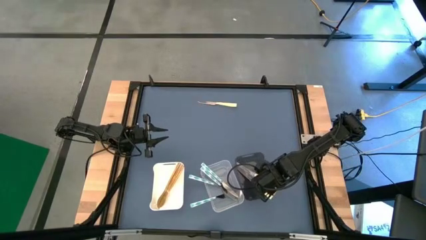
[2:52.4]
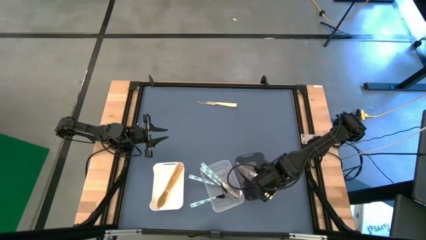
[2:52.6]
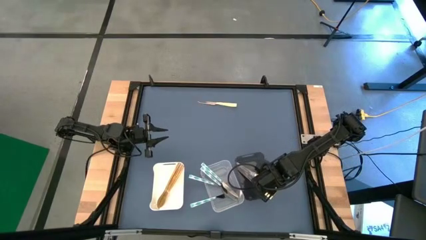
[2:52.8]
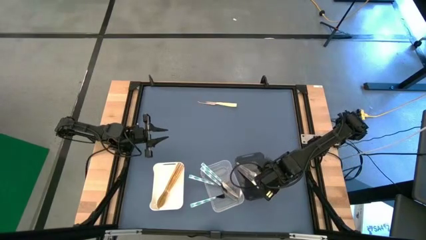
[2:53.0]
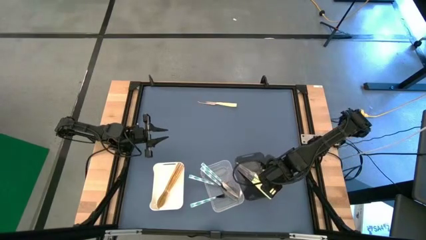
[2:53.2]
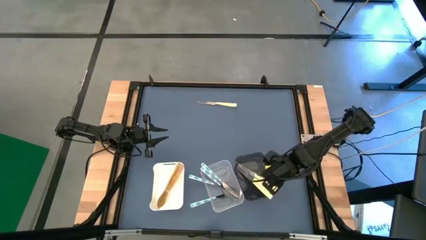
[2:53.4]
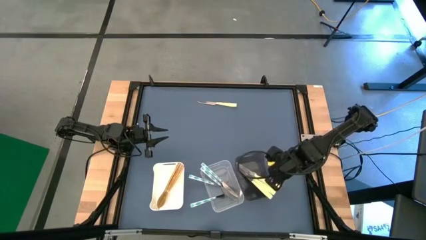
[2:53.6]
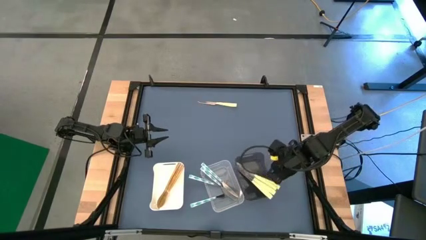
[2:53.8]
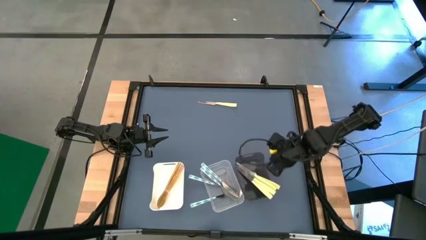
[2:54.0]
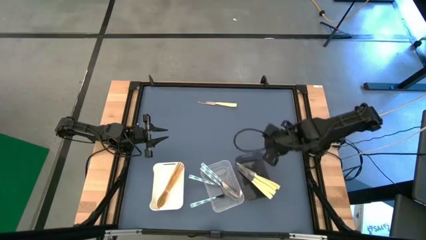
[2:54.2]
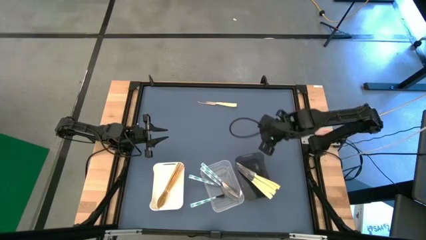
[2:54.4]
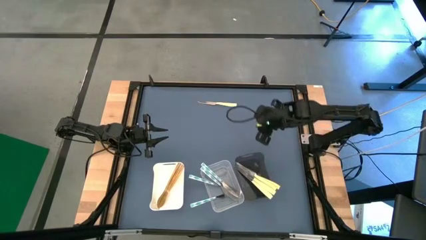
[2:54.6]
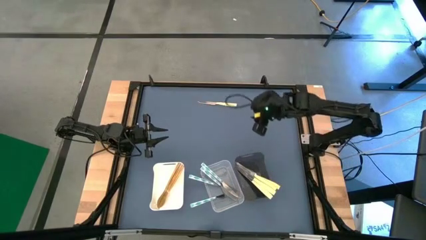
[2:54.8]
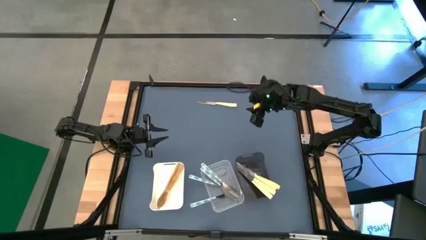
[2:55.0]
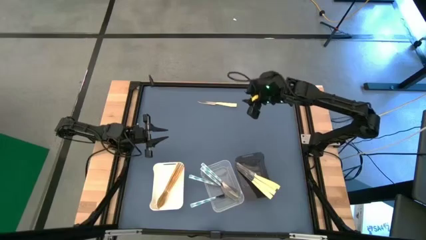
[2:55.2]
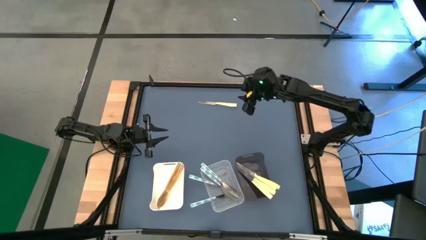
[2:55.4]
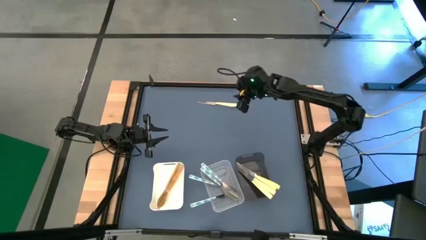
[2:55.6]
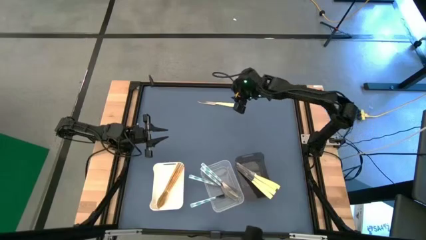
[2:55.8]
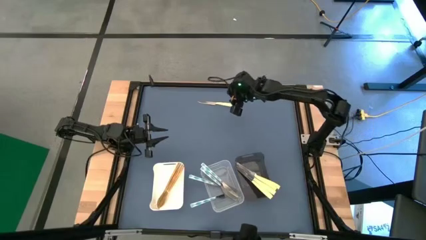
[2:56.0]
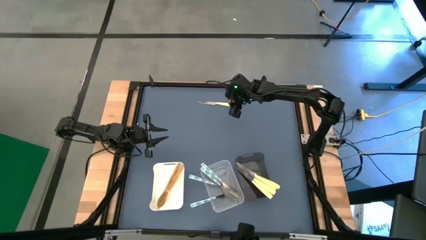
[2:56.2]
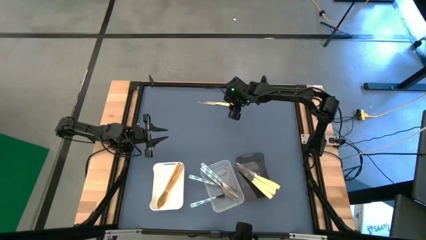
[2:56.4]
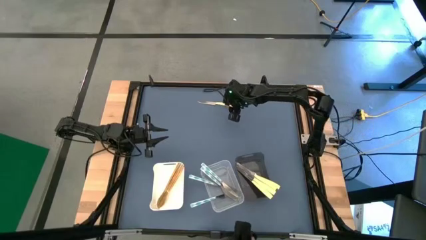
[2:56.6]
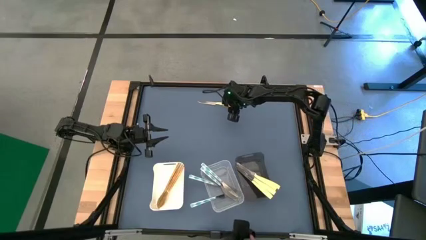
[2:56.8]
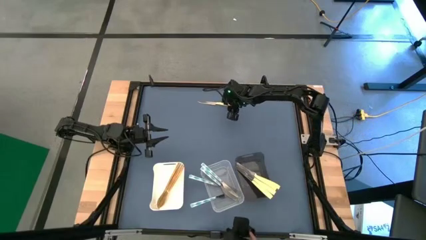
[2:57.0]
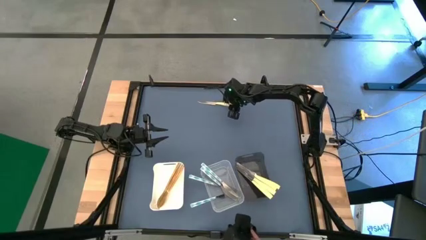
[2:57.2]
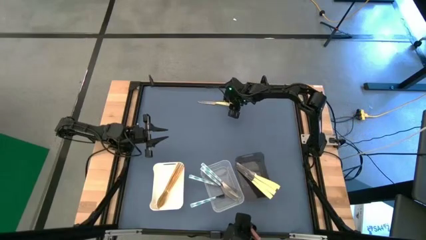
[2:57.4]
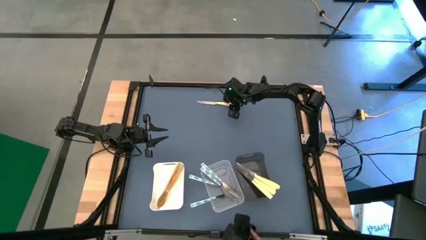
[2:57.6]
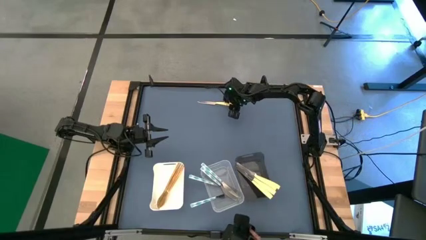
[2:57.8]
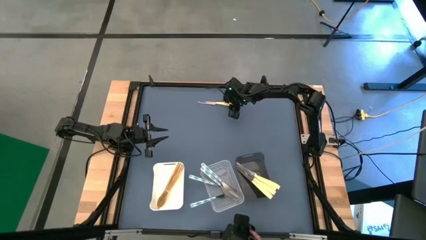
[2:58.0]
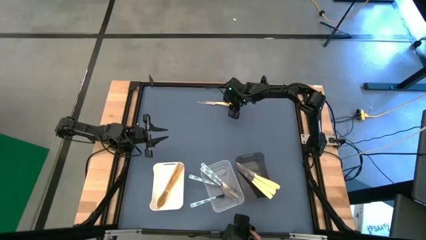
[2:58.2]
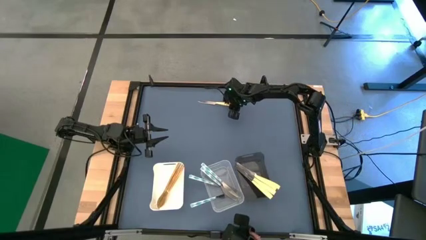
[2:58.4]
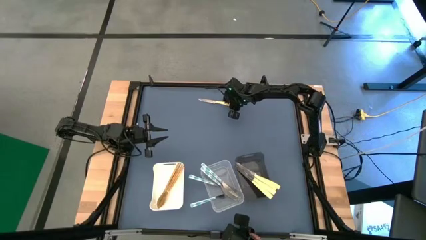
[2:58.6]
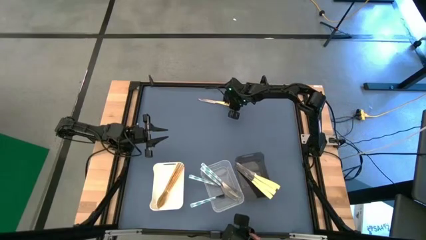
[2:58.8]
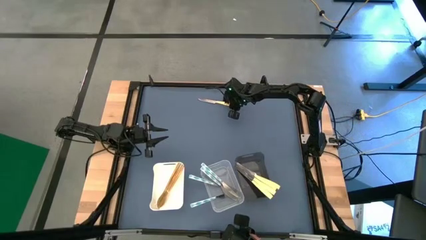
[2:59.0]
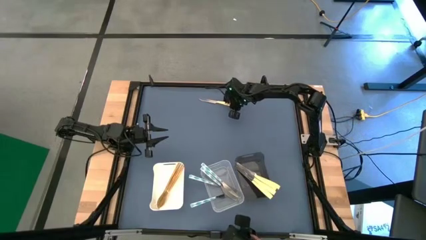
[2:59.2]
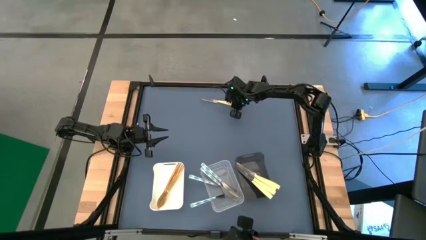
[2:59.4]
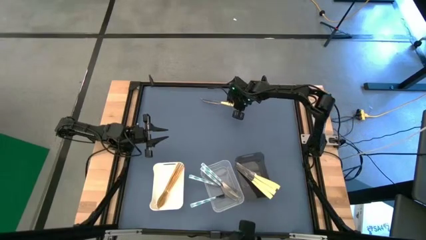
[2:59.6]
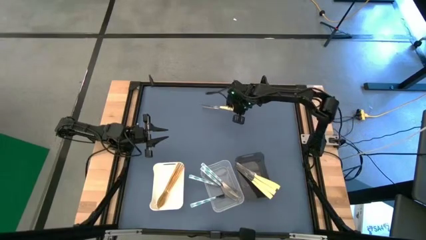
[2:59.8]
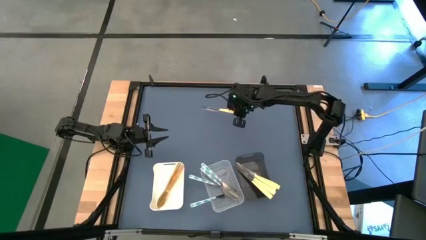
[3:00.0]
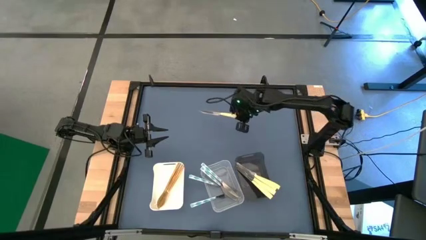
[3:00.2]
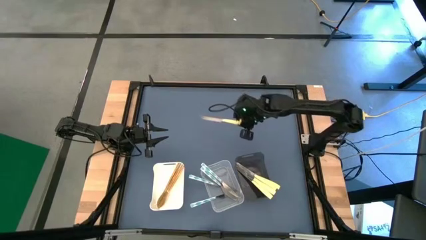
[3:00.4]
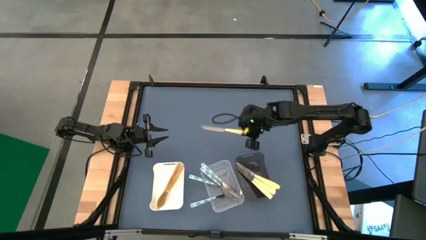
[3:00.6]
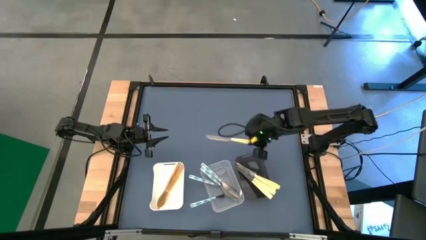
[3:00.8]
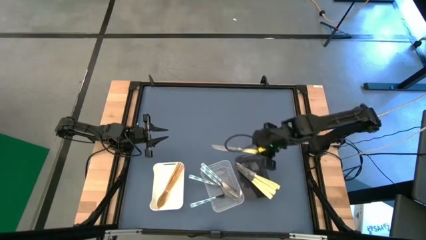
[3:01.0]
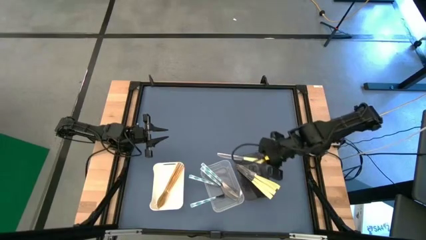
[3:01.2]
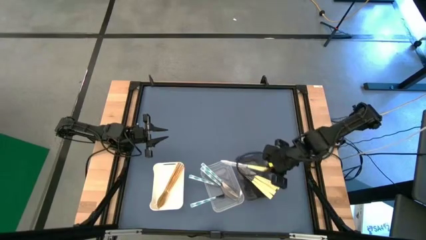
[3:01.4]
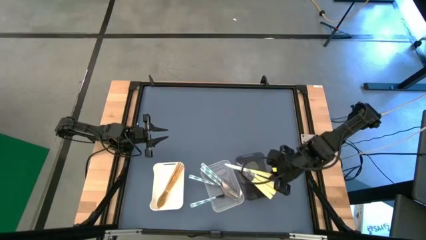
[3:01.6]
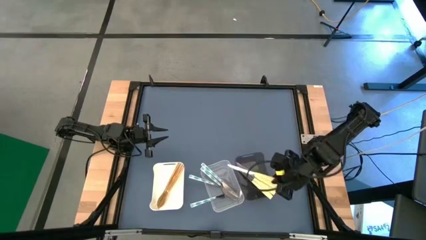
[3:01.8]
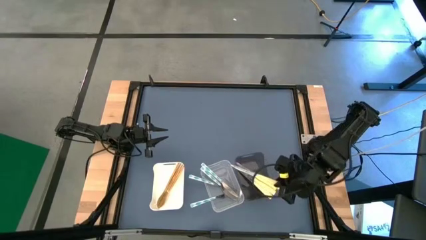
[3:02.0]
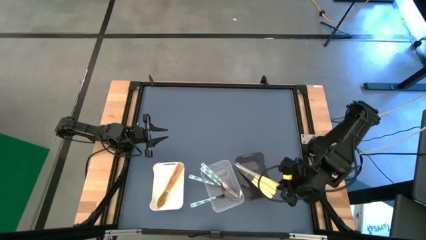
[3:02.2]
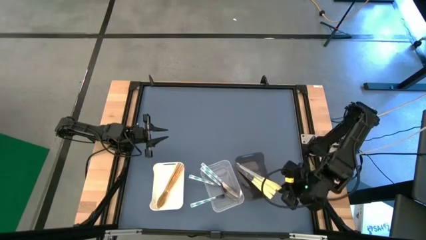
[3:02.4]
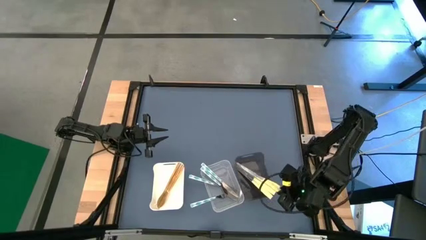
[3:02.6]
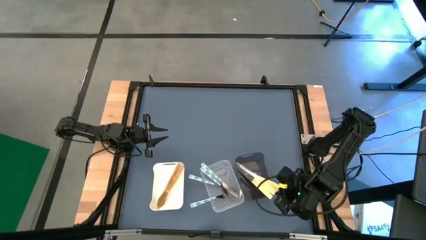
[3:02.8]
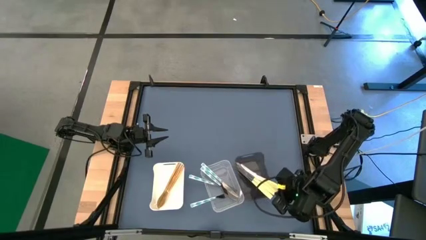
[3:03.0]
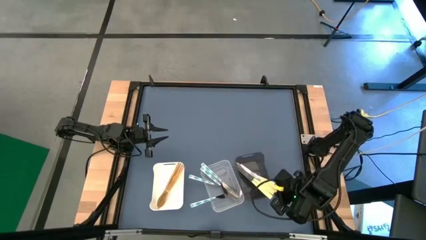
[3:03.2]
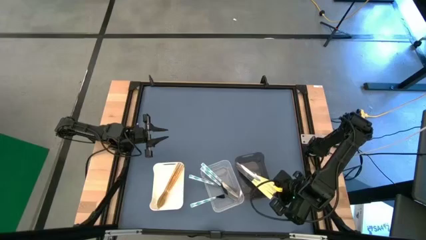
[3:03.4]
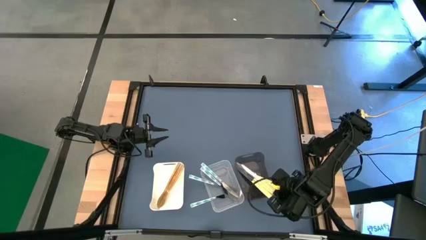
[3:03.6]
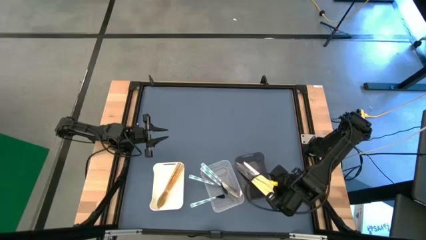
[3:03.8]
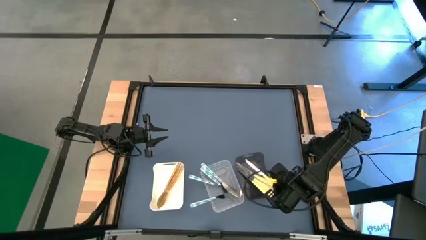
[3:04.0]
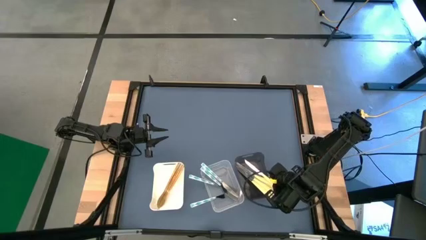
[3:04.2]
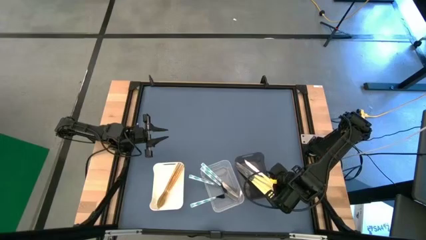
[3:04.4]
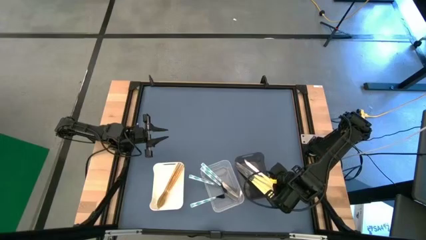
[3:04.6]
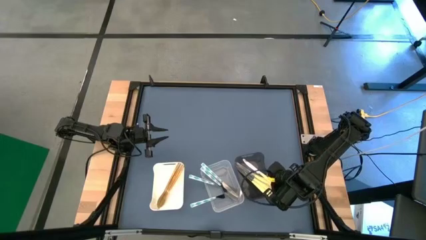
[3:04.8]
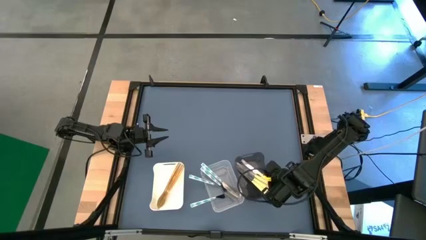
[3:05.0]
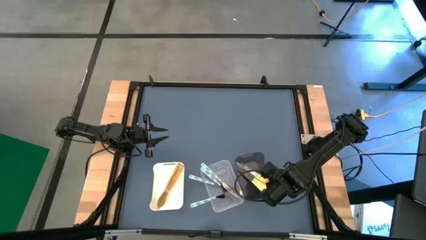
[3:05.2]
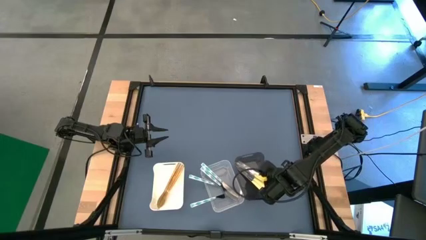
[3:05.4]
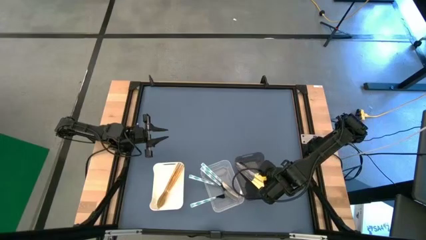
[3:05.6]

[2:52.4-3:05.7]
Task: Sort silverware by color (type)
Put the yellow table knife into the black transparent bin

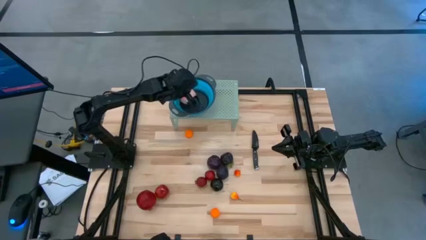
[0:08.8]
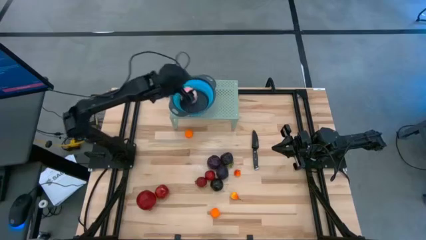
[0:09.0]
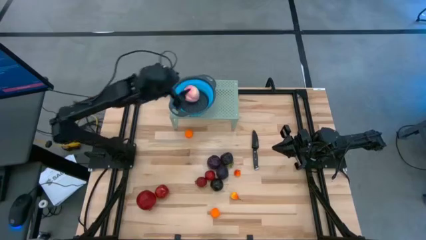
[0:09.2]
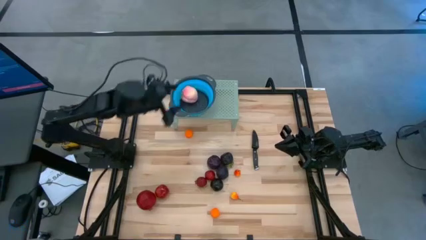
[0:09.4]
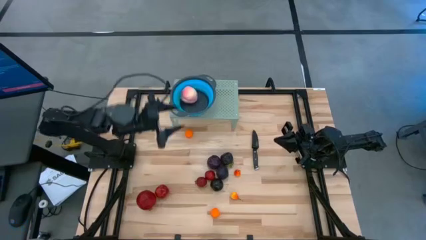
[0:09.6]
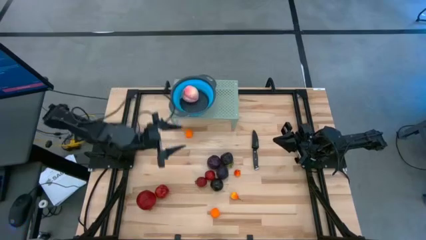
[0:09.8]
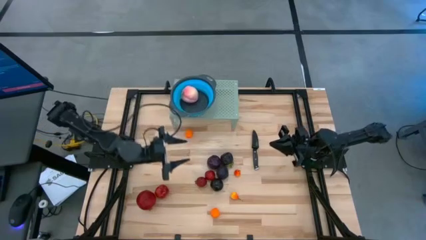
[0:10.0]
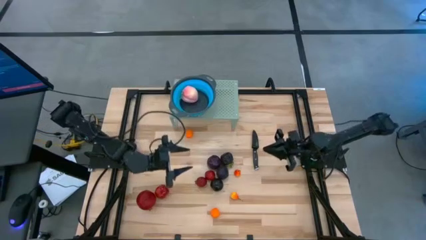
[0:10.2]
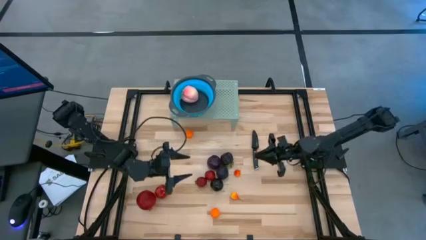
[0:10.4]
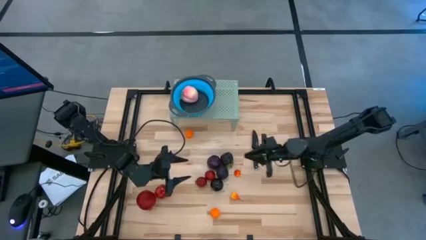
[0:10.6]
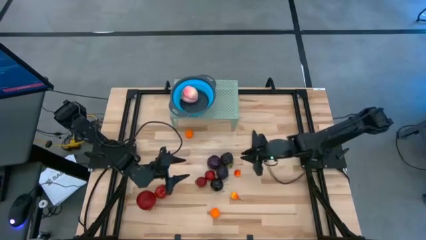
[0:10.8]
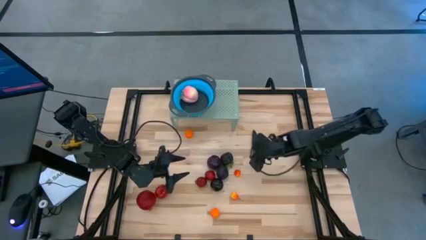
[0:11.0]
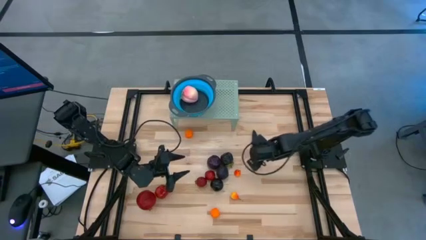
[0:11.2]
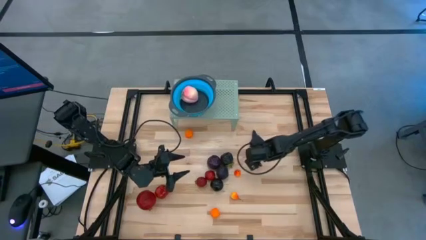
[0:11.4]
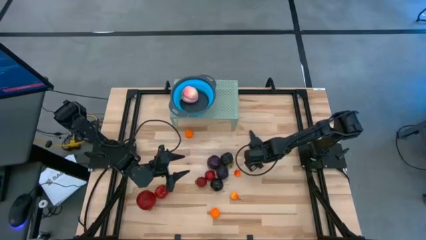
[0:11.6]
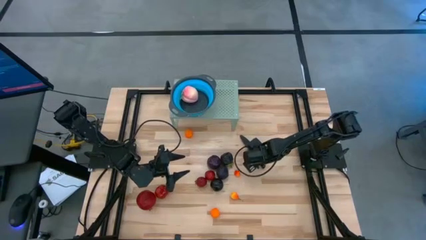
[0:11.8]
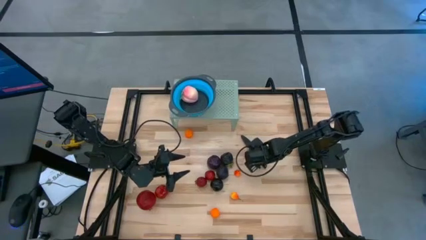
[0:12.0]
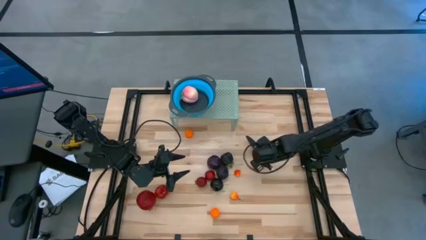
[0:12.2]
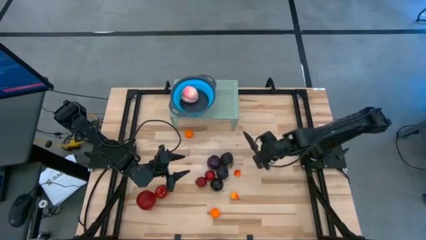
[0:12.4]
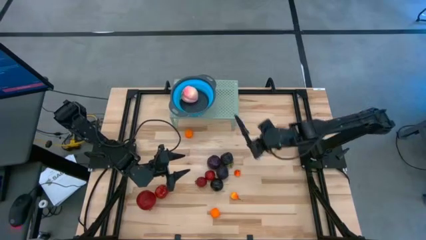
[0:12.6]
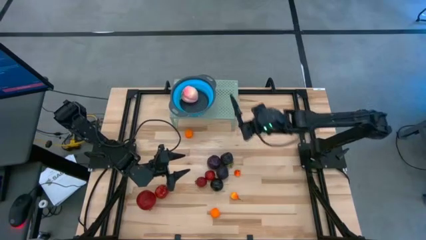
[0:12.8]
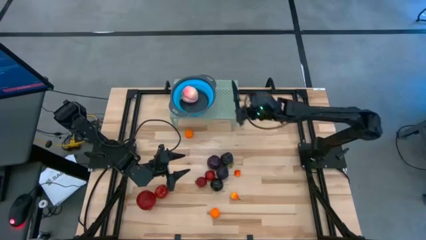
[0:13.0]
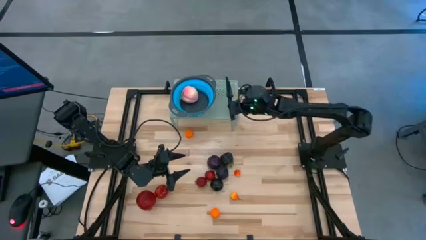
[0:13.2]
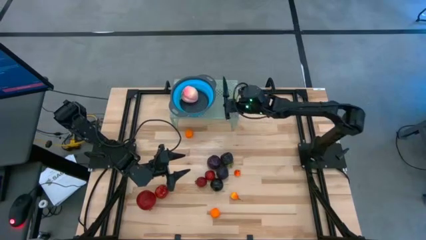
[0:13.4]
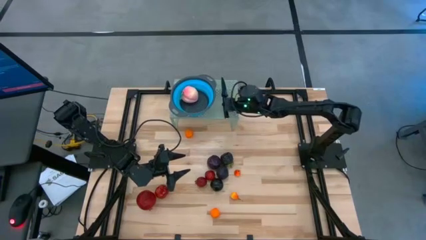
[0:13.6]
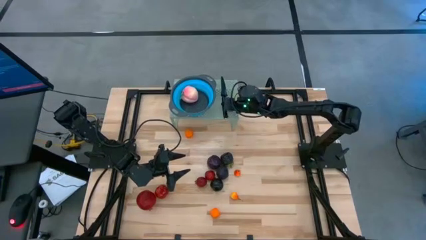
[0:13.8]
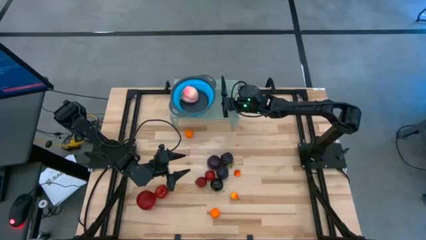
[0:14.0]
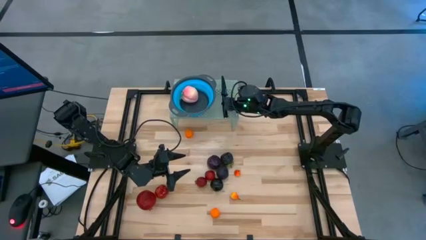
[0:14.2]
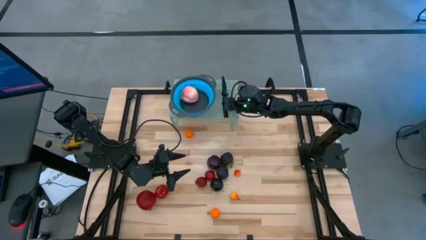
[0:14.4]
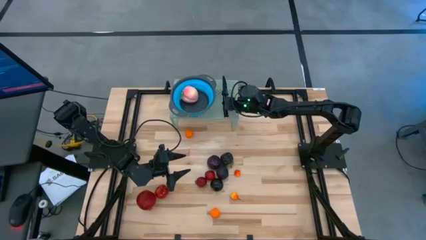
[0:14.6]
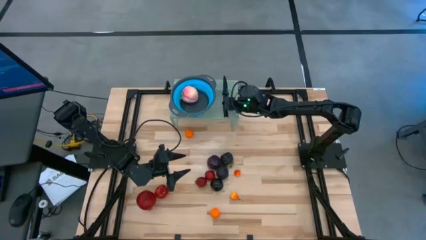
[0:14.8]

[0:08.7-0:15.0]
Task: Pick & Place Fruit
Put the black knife on the shelf to the right of the blue strainer bowl
